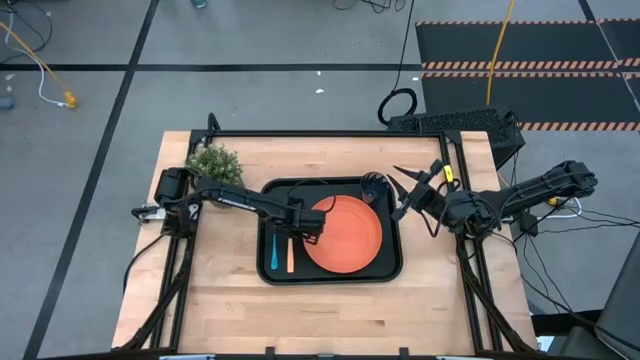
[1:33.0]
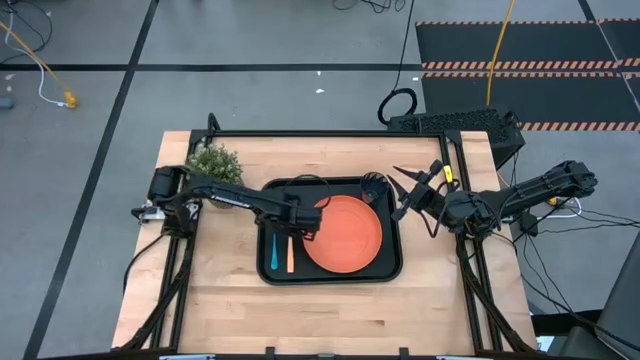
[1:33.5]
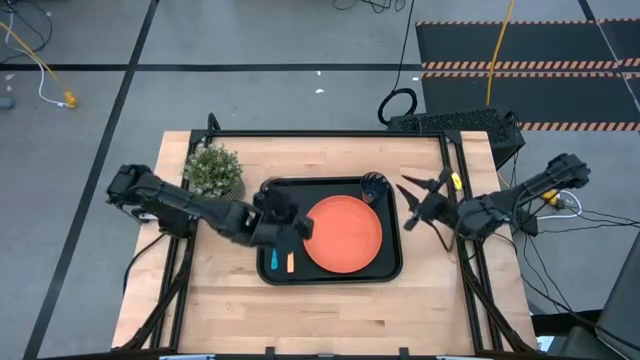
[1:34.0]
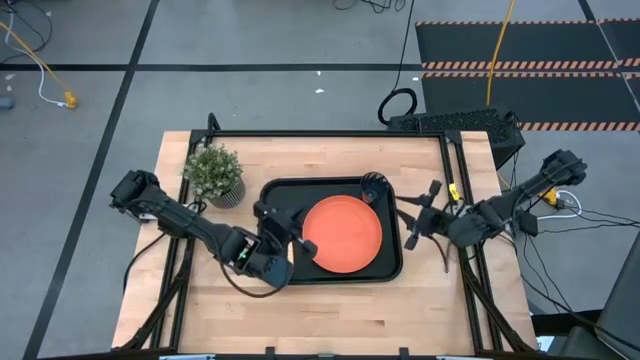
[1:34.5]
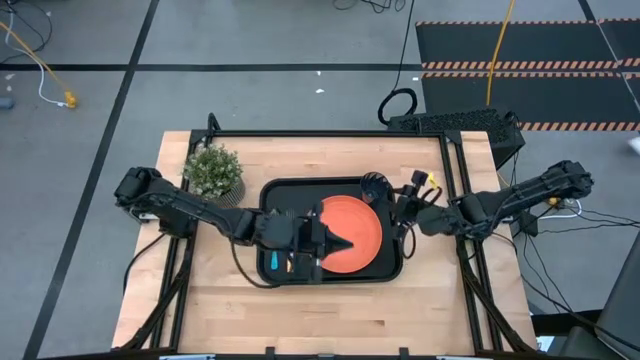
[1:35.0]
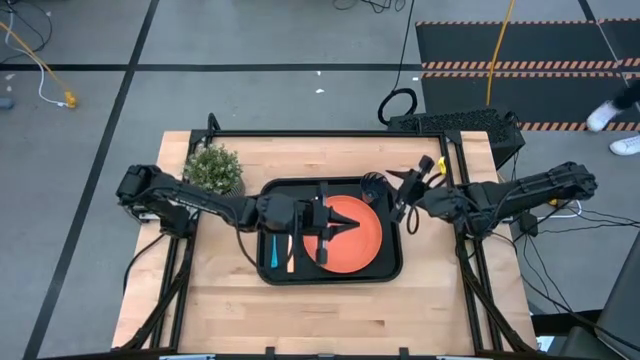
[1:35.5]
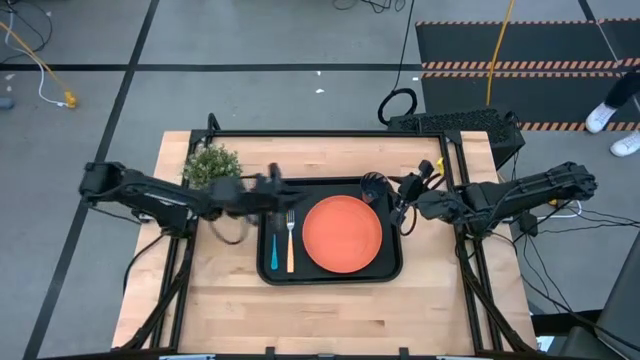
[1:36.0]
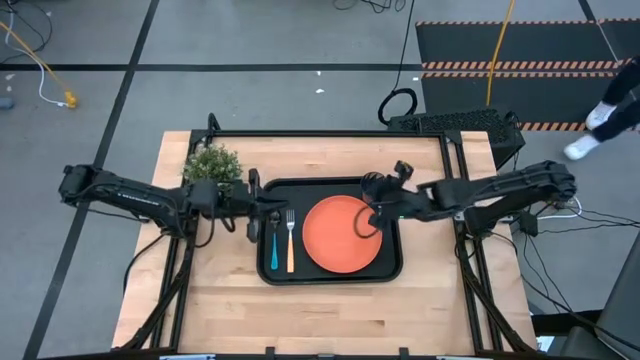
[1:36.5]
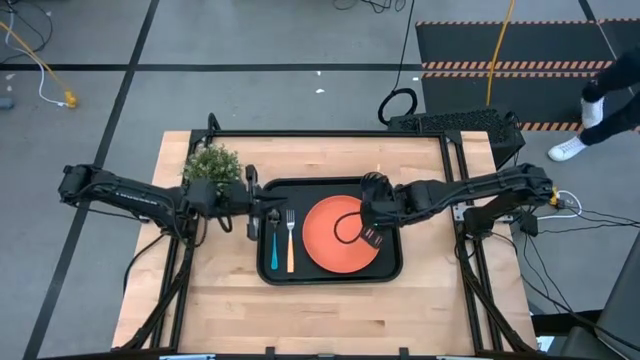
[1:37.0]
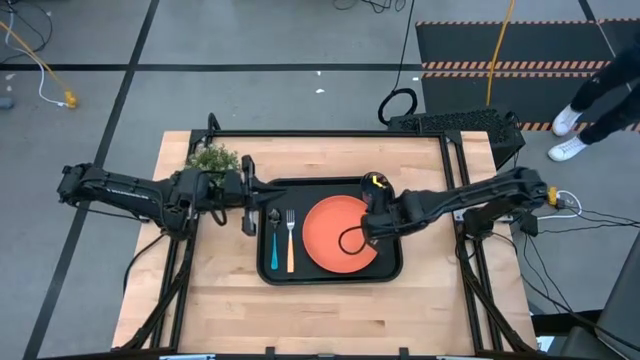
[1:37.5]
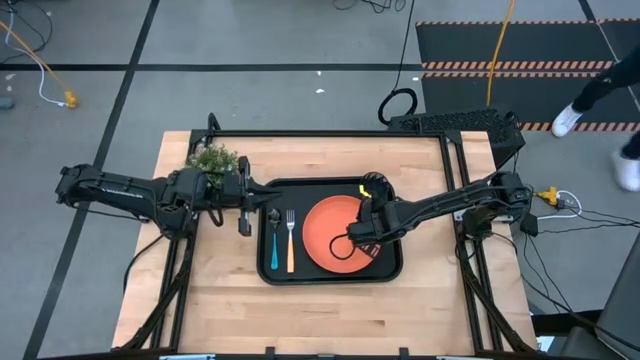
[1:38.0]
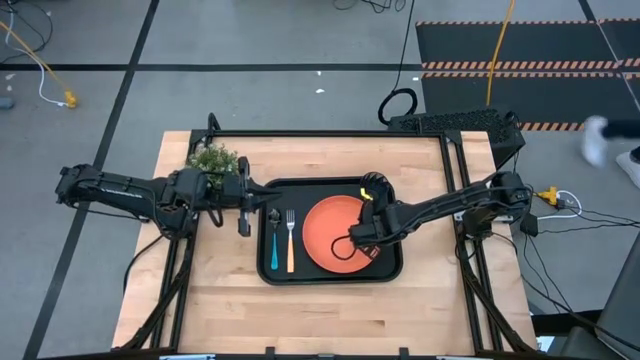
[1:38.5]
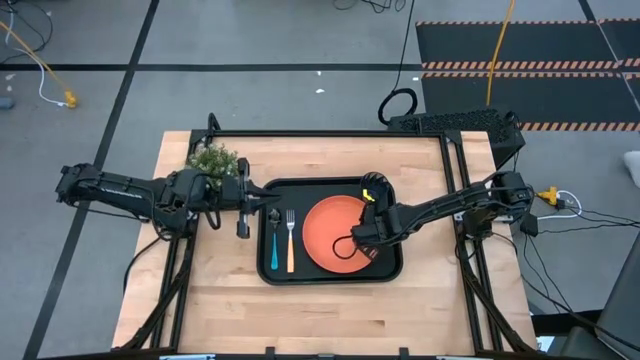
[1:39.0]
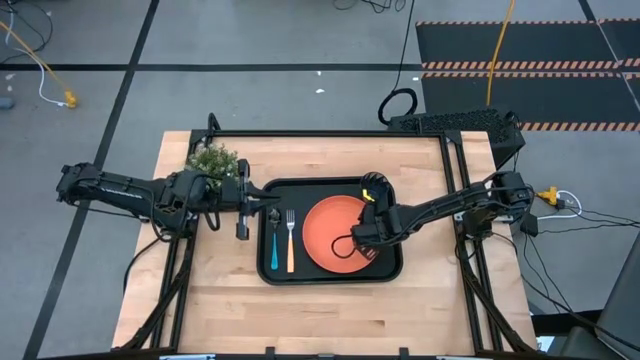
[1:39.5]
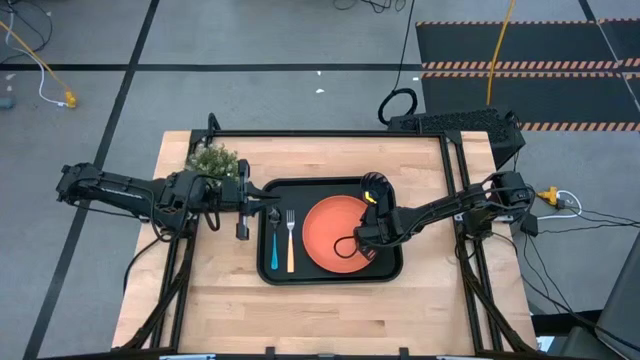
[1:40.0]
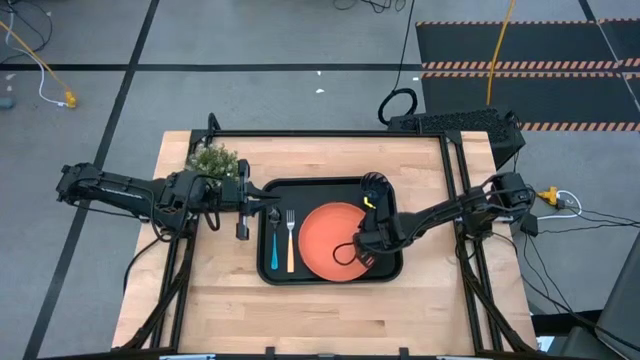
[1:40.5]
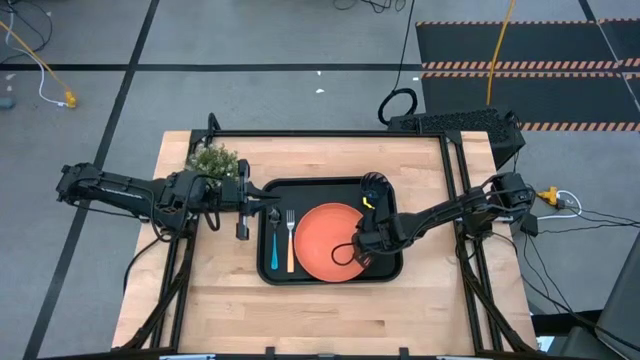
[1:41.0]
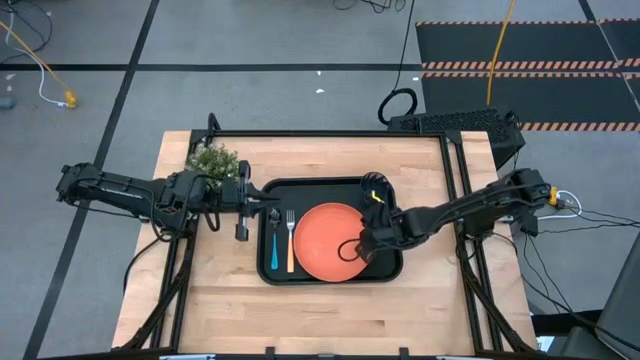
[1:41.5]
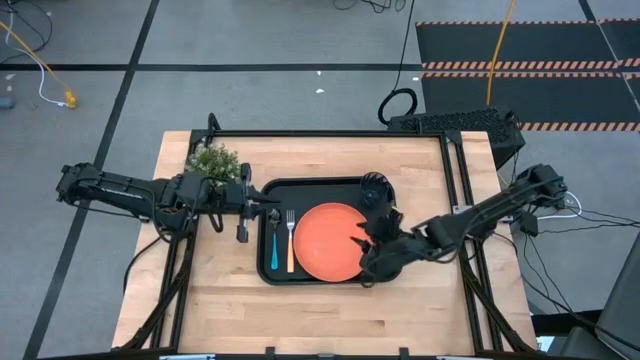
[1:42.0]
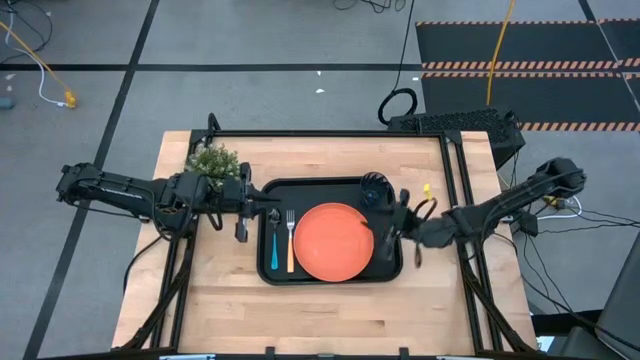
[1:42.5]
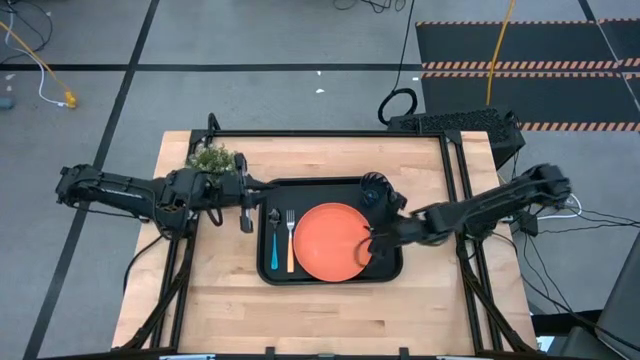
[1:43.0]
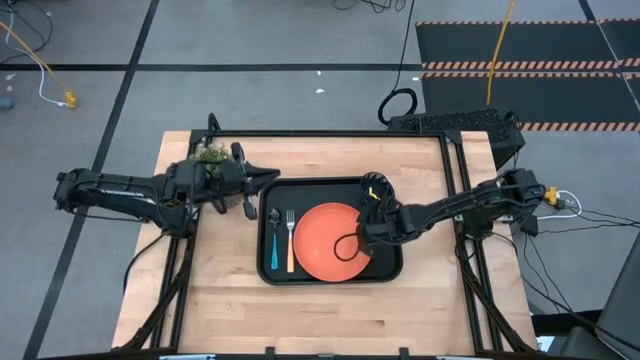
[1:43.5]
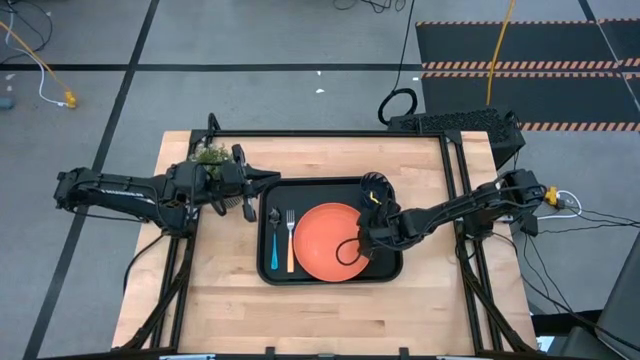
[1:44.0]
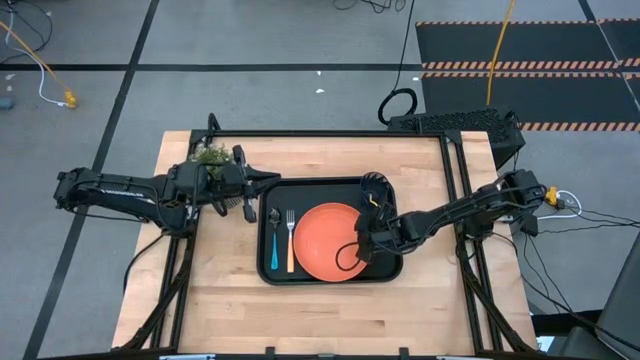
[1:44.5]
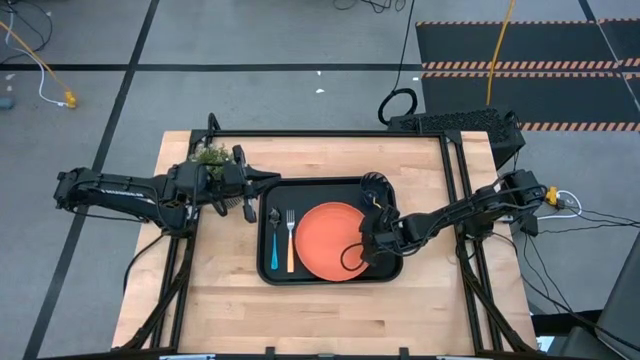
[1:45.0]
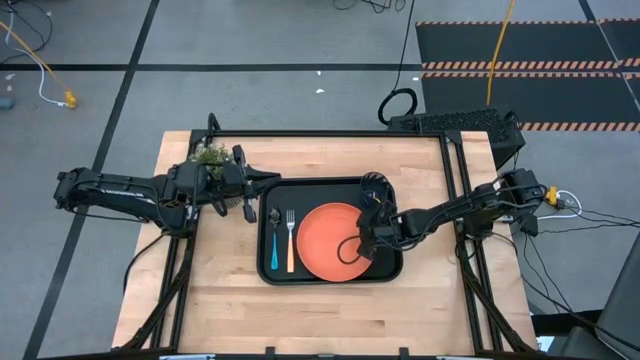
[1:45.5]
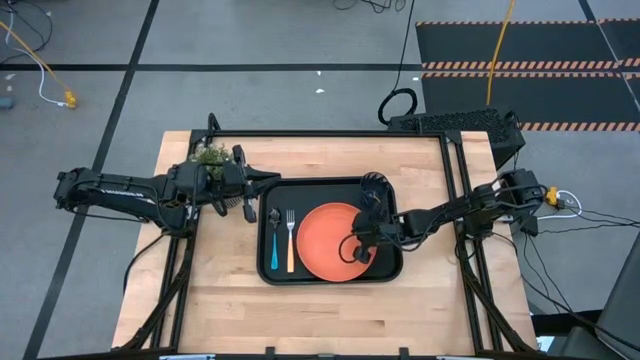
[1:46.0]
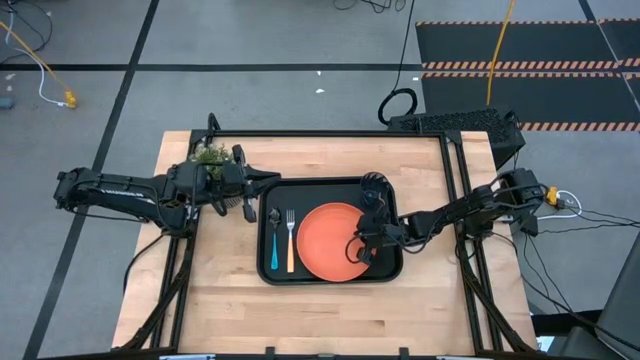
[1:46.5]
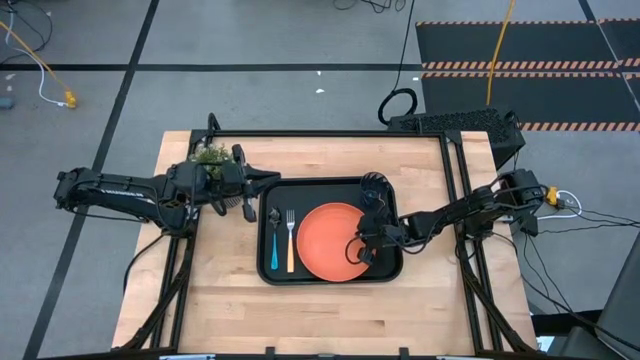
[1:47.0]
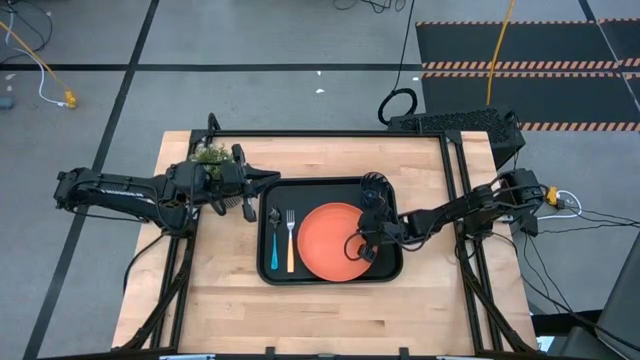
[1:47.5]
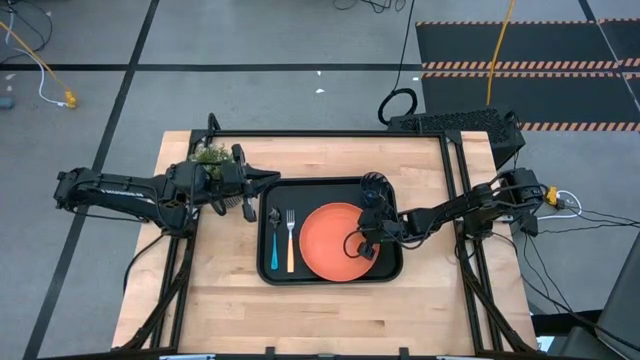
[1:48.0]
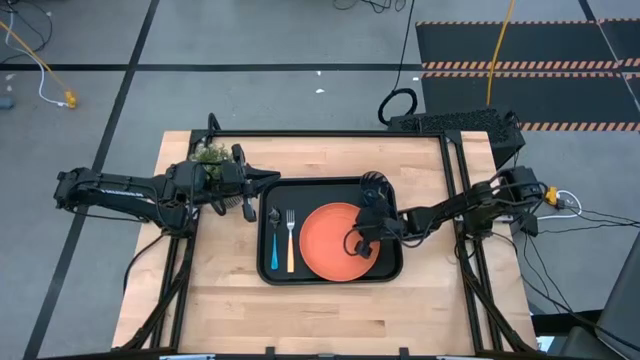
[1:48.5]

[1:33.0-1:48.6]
Task: Pick and place plate/cup/fork/spoon on tray
Adjust the orange plate on the black serving tray

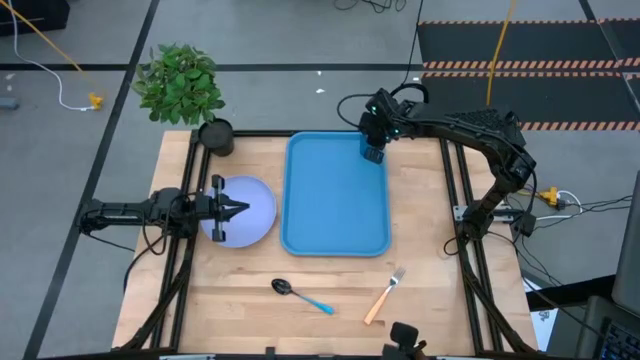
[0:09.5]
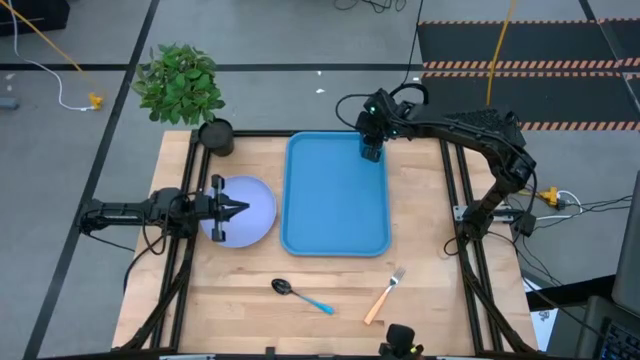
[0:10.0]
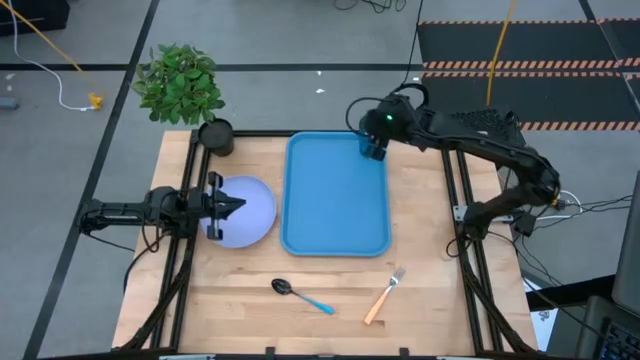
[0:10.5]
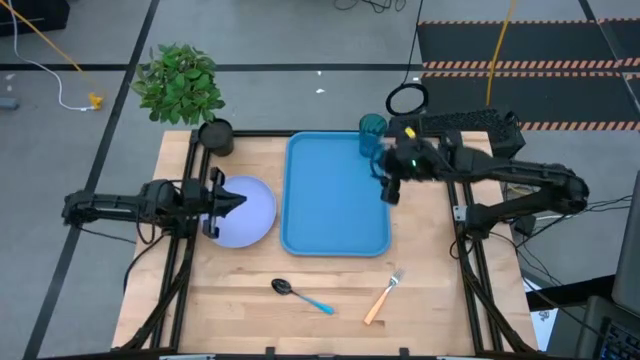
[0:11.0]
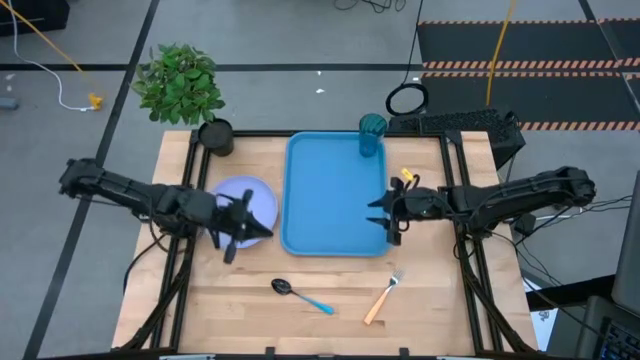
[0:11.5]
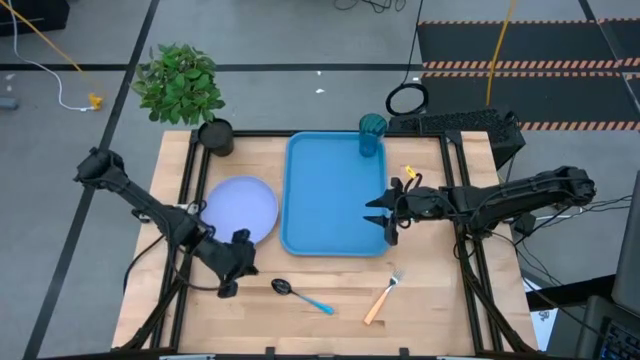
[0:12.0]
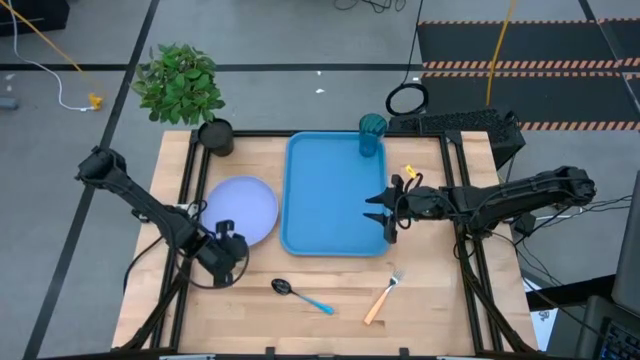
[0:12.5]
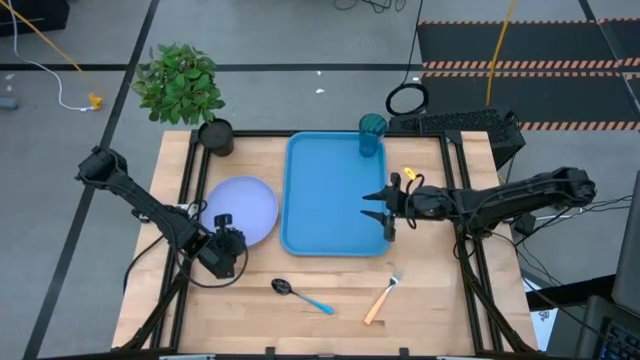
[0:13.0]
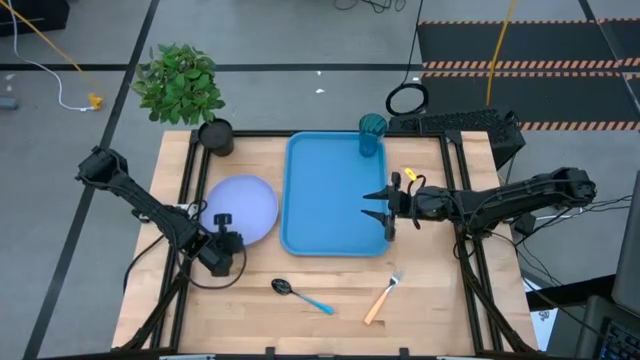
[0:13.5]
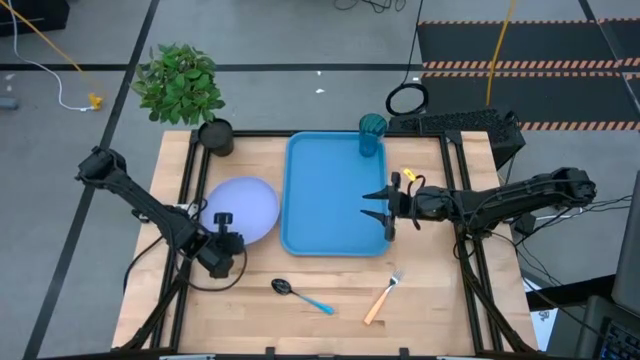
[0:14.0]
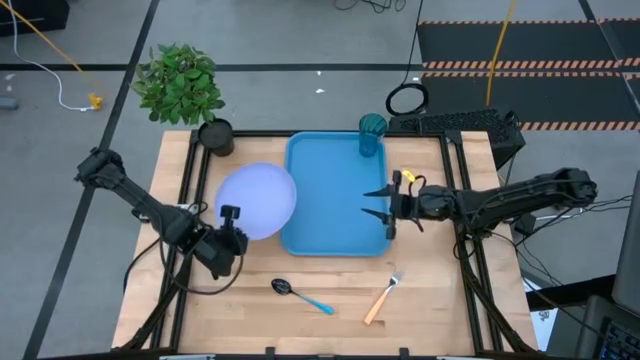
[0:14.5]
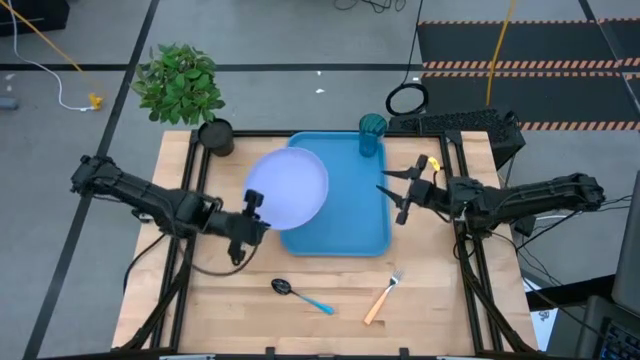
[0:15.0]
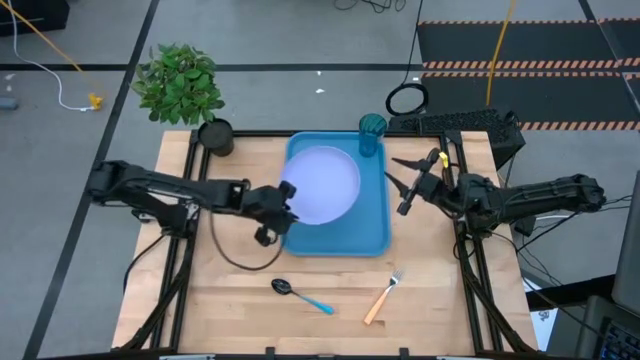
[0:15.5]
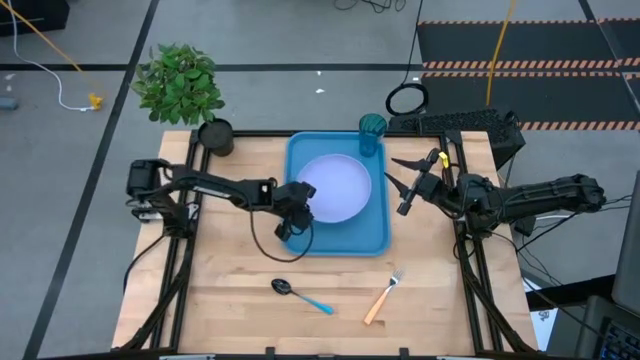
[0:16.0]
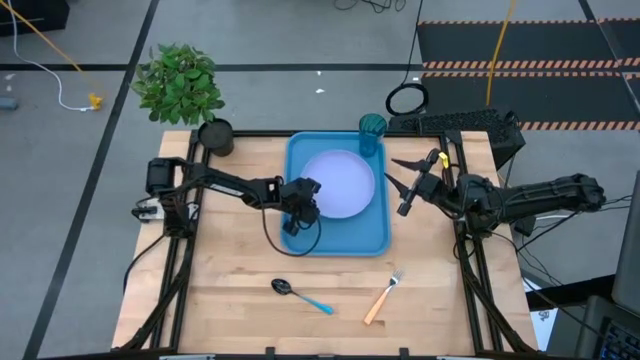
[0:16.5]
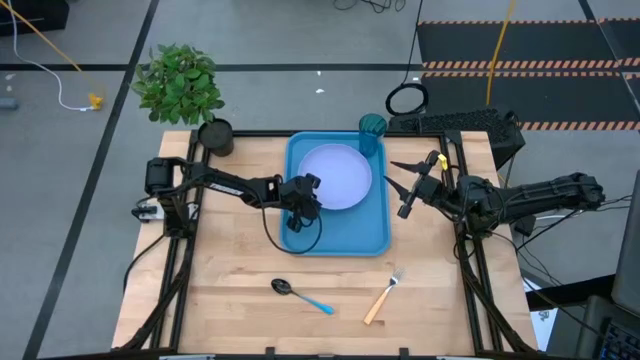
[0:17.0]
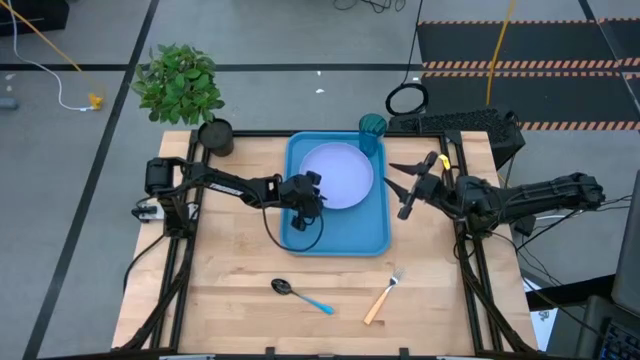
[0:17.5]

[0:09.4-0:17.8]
Task: Pick and place plate/cup/fork/spoon on tray
Put the purple plate on the blue serving tray to the bottom right of the blue glass
